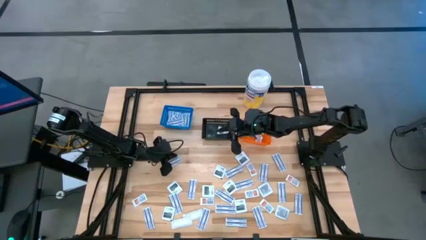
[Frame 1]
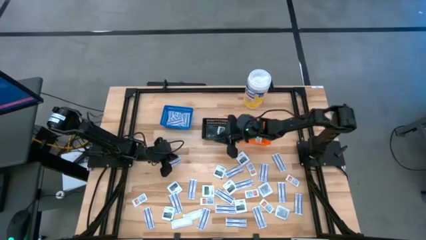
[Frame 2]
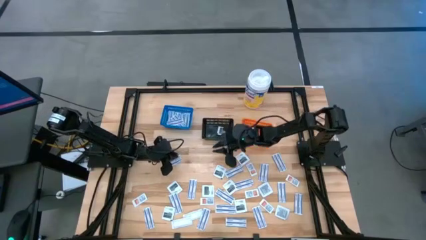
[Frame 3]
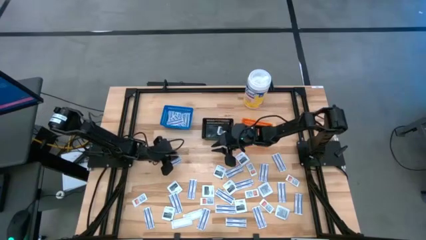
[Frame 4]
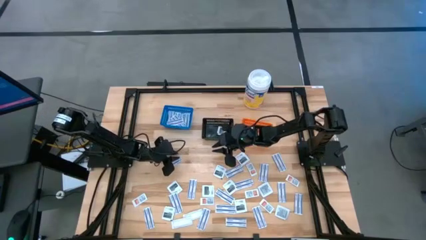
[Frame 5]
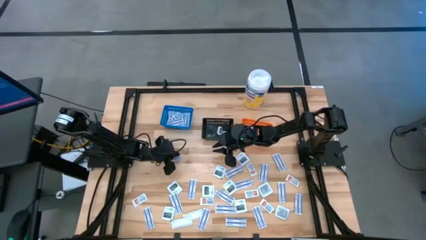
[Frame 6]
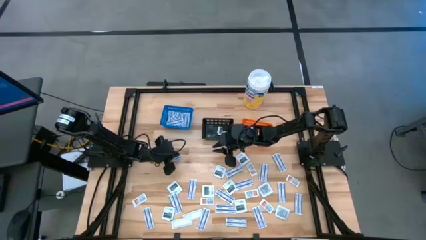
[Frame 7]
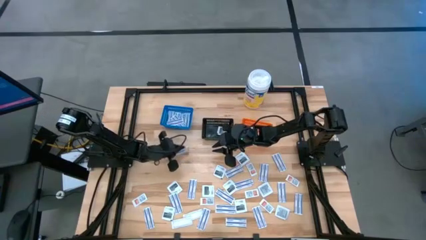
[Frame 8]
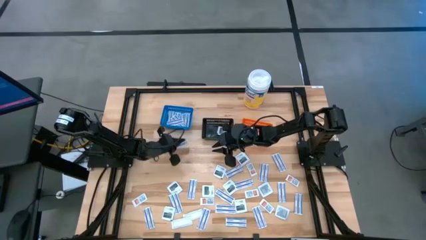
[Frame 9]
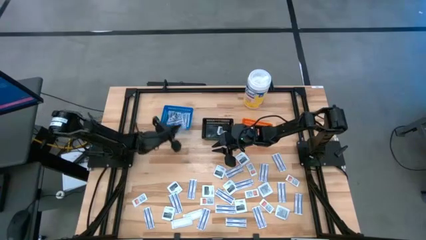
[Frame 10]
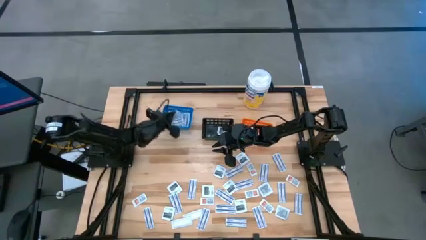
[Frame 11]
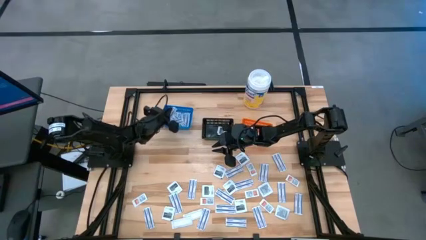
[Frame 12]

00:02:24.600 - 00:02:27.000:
Task: Pick & Place First Aid Supplies
Put the bandage into the blue container

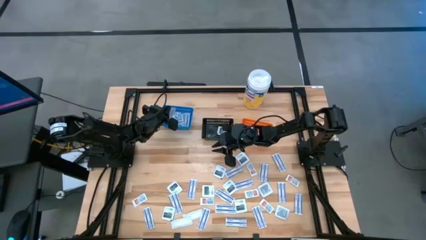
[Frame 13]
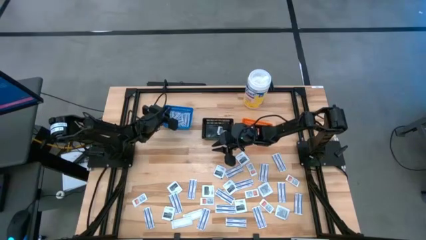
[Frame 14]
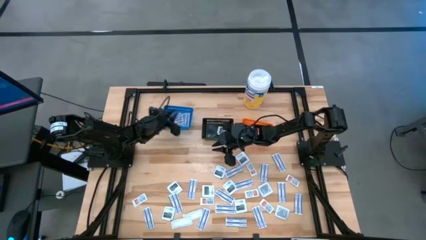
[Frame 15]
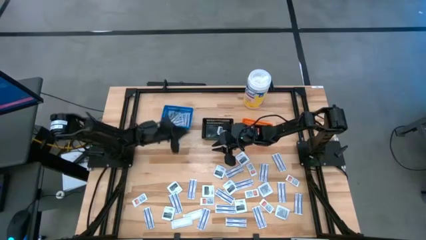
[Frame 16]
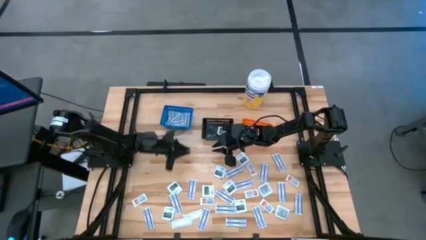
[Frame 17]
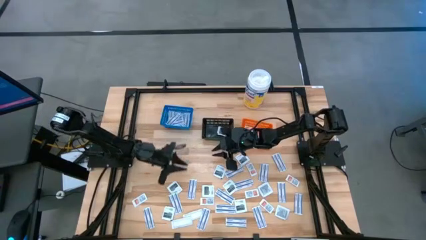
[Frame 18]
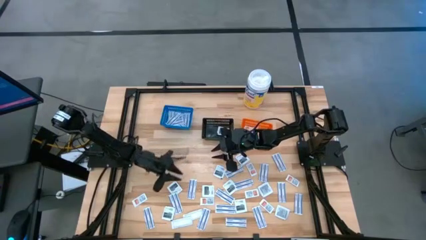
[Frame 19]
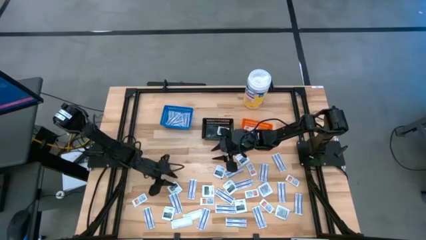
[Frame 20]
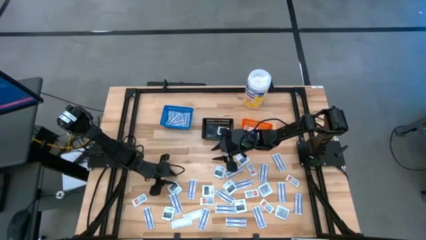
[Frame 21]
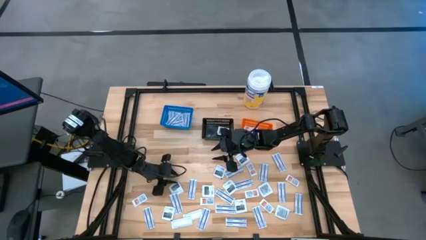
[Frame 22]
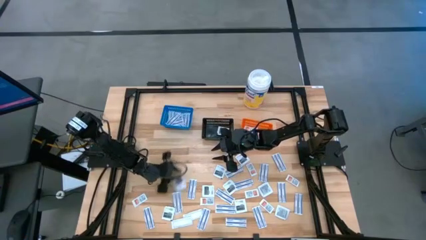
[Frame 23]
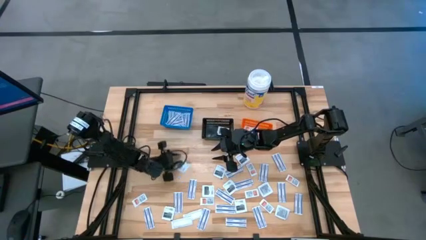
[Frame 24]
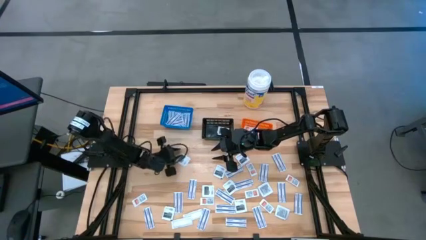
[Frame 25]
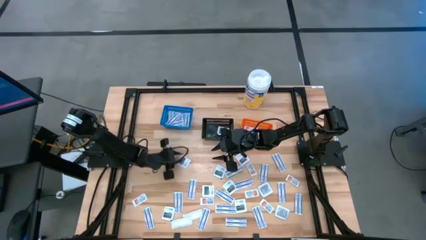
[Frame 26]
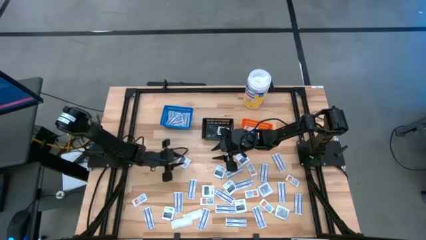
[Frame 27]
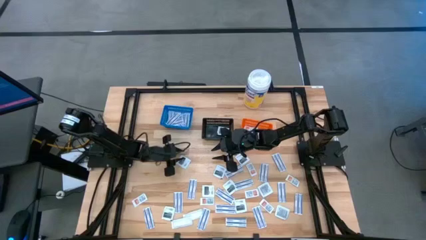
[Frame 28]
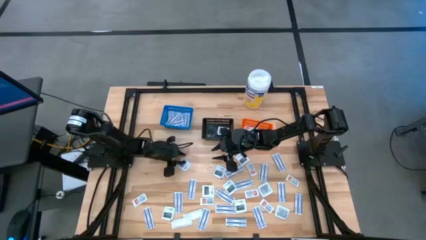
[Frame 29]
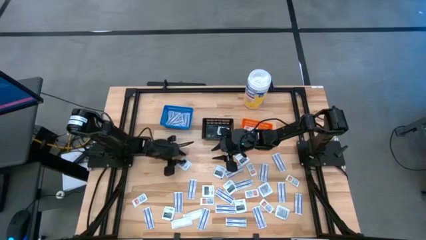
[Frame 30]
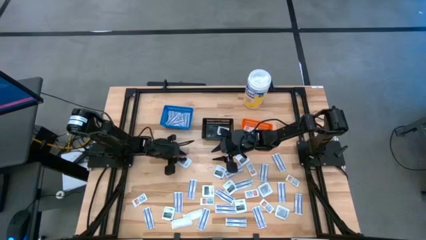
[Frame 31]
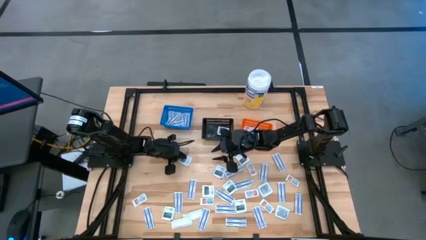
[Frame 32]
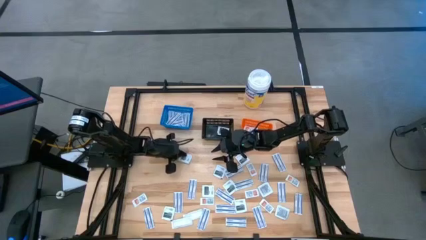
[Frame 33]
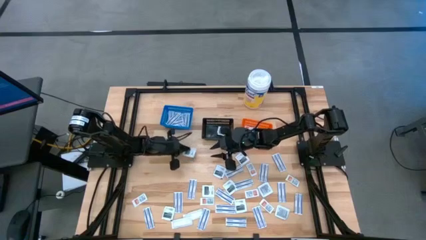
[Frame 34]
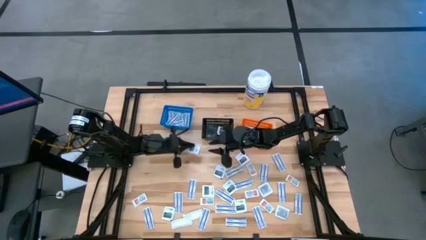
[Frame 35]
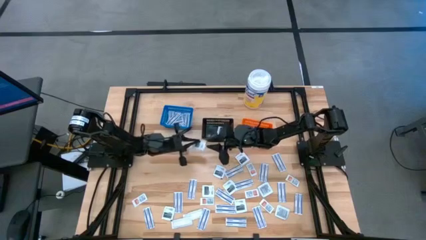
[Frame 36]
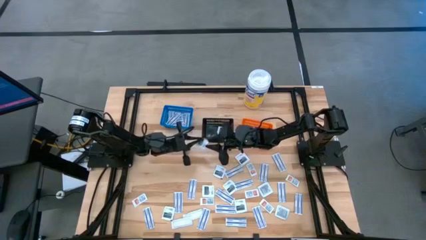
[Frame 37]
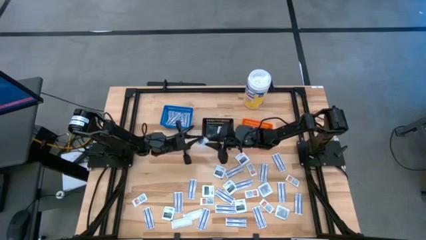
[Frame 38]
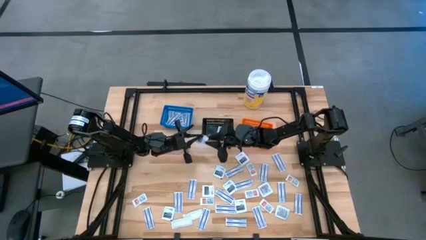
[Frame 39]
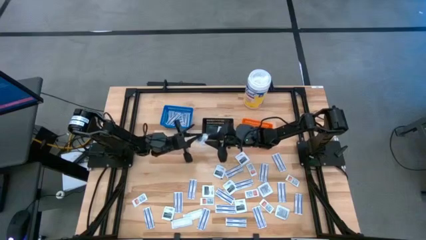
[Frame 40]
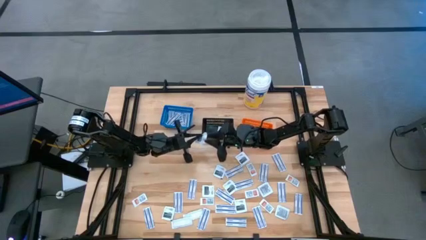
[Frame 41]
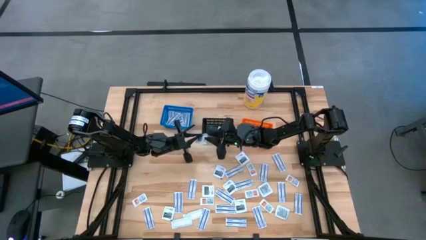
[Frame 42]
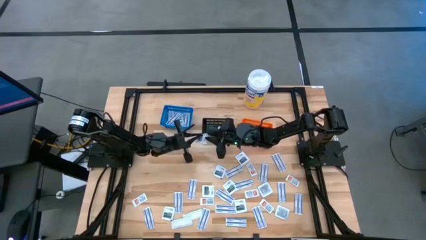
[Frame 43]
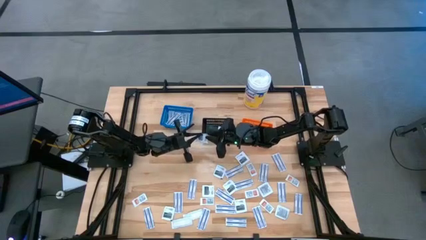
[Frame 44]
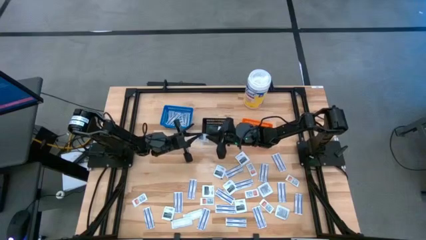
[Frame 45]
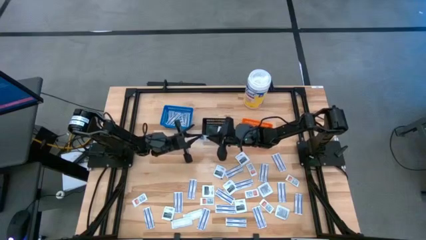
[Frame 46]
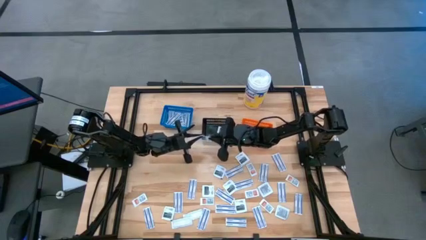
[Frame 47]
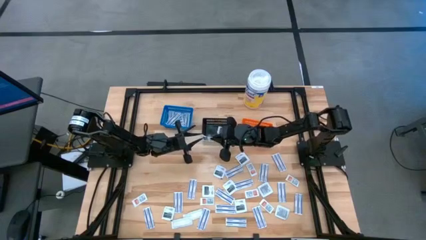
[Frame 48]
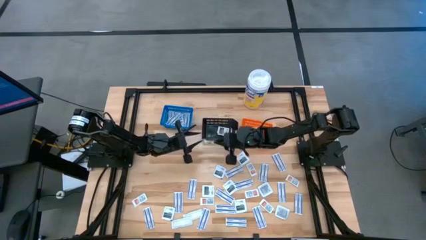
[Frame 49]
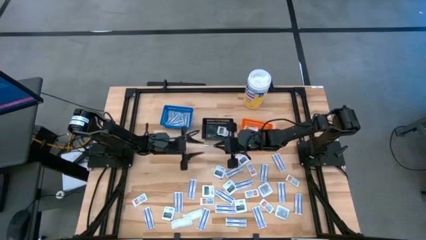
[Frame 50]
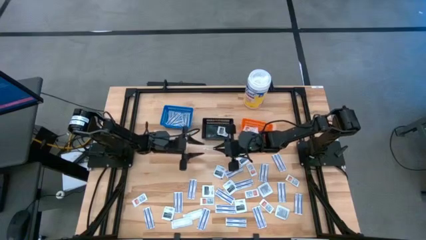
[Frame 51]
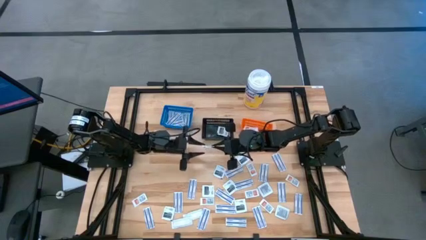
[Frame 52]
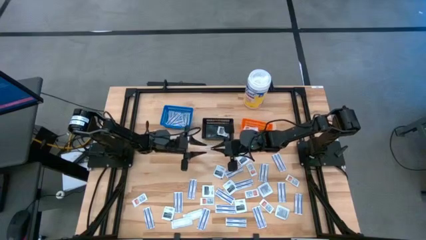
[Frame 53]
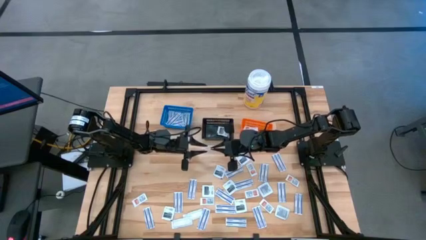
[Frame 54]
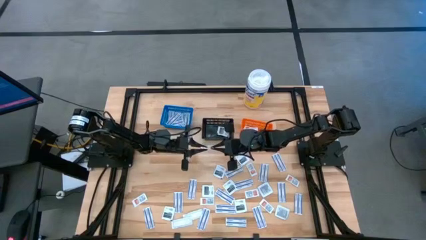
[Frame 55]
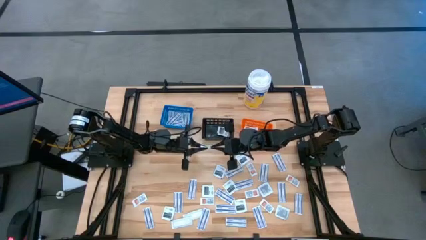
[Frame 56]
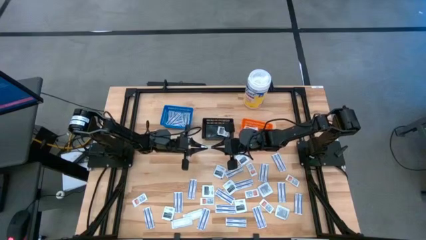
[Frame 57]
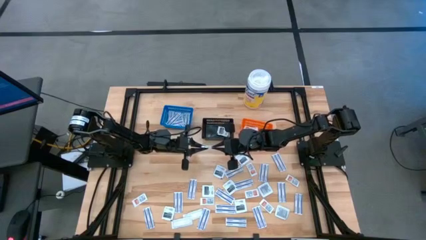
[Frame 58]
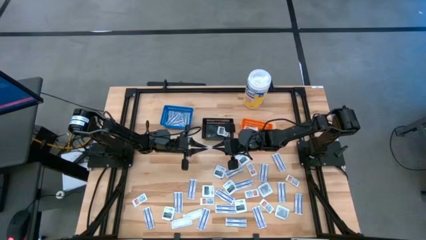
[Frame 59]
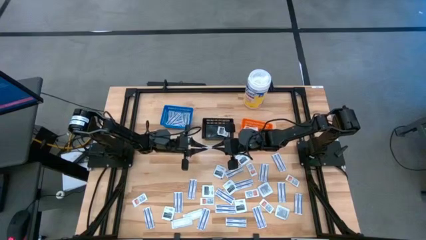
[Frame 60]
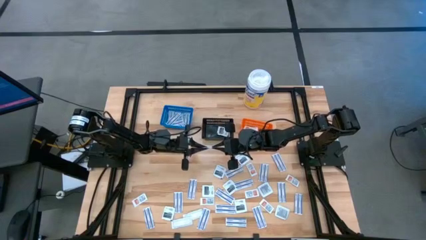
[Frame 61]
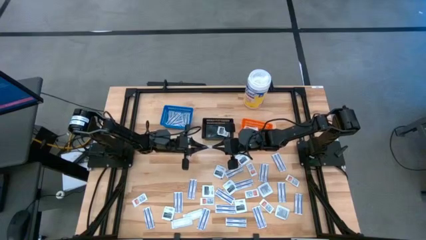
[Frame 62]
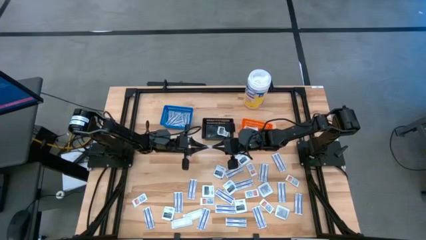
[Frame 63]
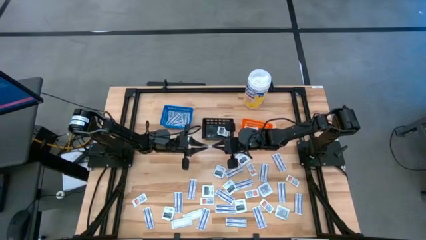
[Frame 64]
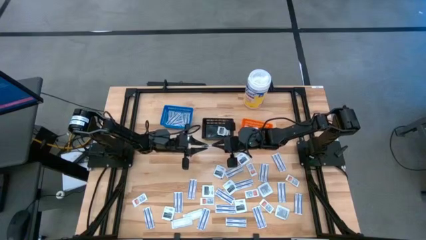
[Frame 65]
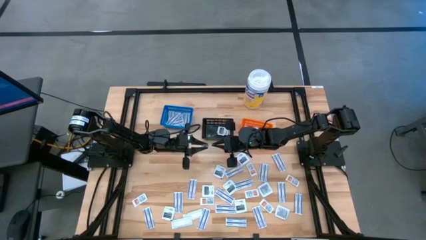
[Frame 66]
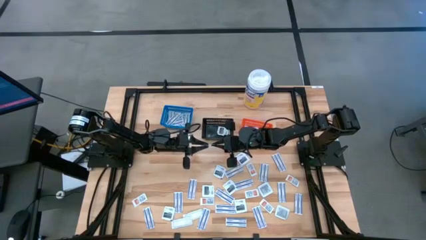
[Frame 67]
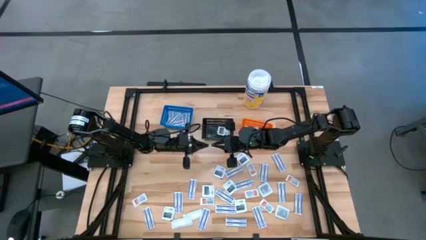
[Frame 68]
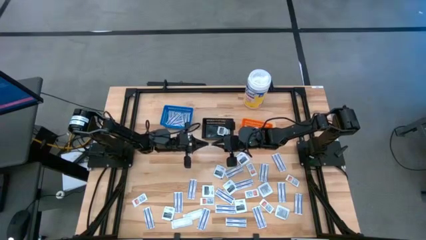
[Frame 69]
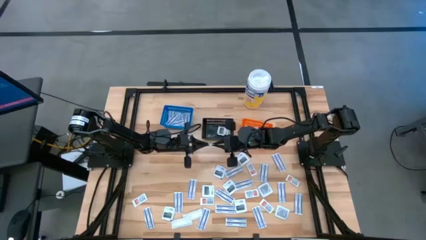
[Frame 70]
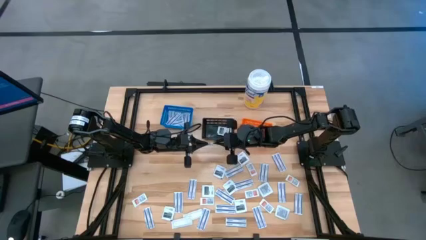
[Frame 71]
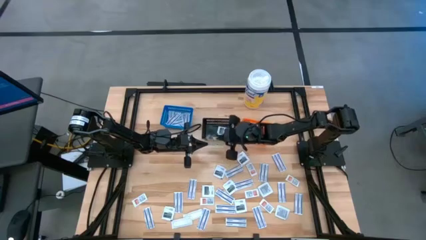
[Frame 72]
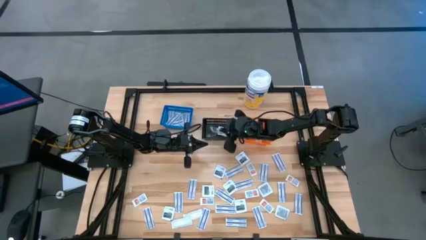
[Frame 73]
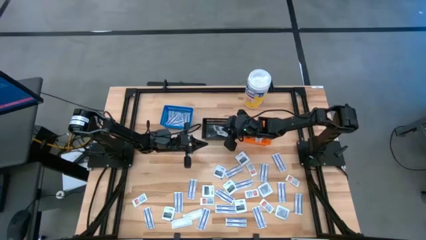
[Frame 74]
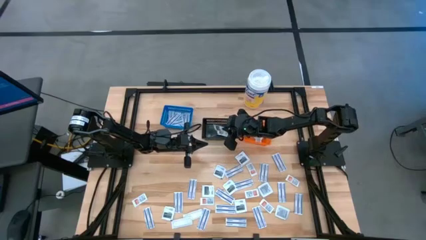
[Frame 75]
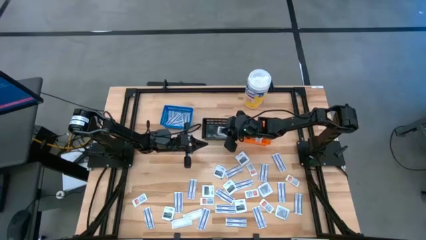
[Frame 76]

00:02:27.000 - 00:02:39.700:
Put the towelette pack into the black bin

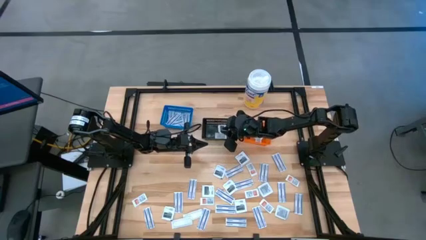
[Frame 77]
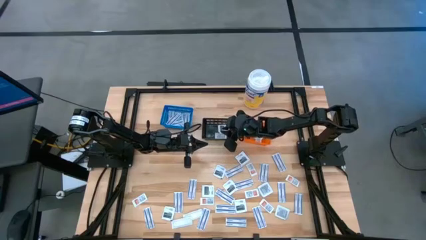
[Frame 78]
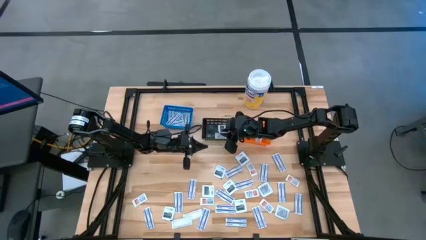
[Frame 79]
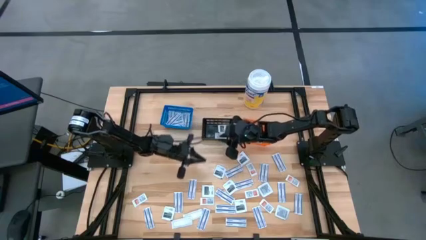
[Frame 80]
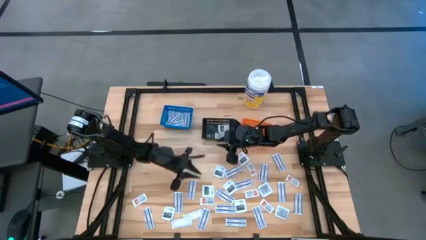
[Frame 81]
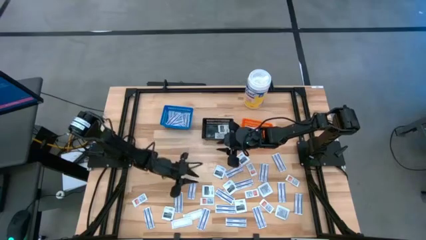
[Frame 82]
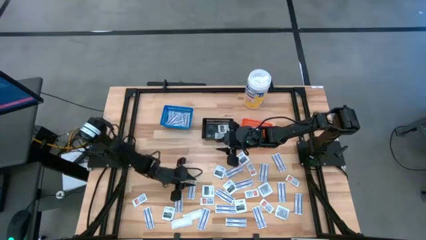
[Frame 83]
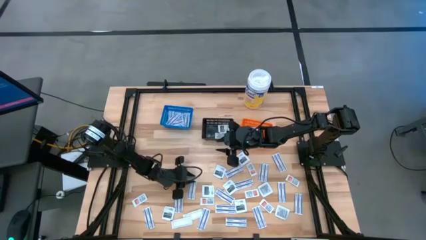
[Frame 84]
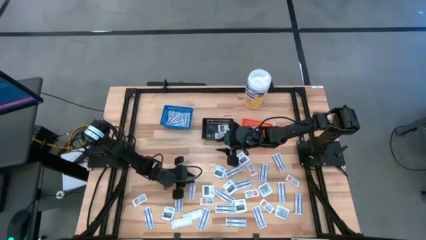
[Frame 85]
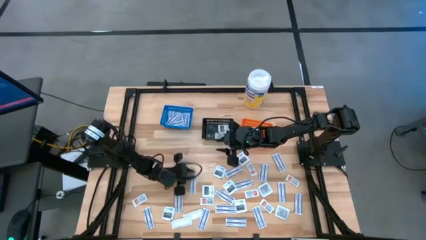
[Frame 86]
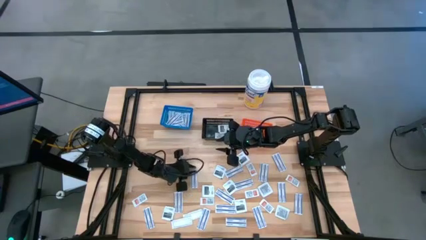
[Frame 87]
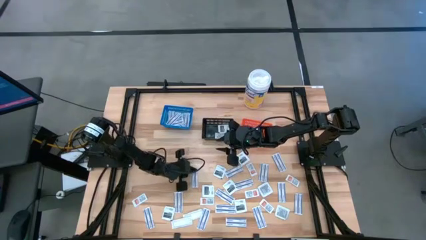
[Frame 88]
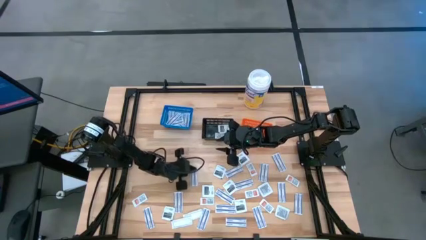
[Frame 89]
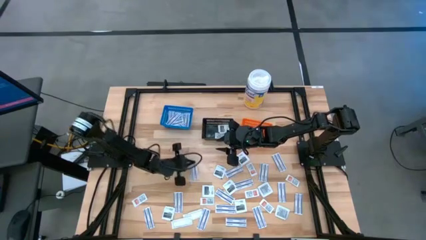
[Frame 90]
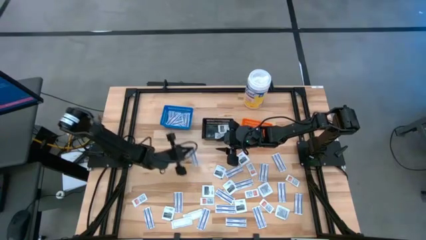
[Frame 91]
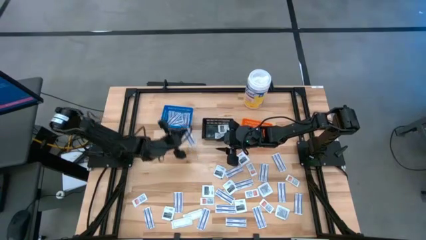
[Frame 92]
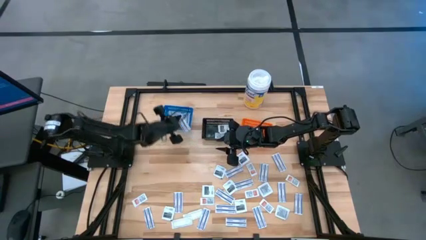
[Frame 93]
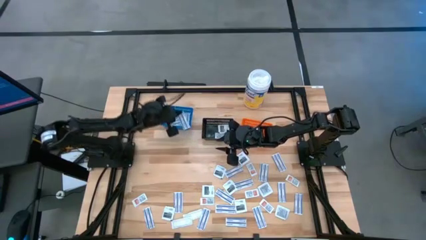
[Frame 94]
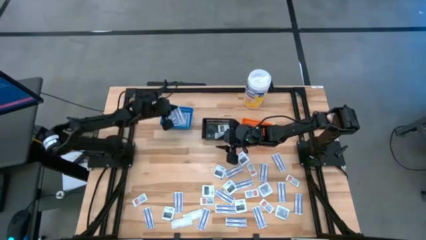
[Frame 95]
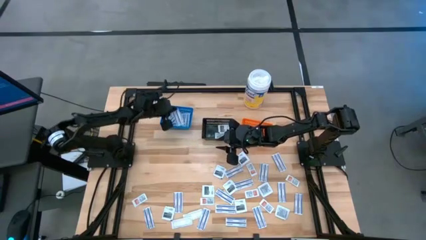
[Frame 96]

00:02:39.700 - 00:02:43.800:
Put the bandage into the blue container
